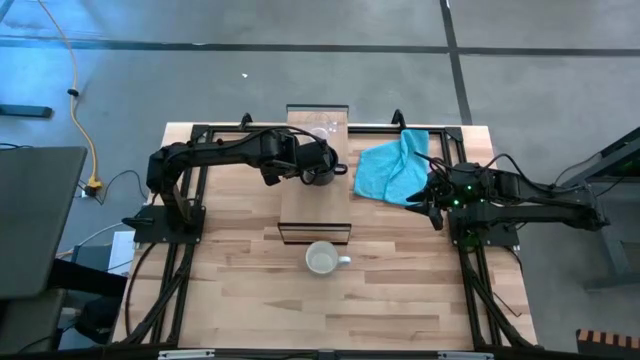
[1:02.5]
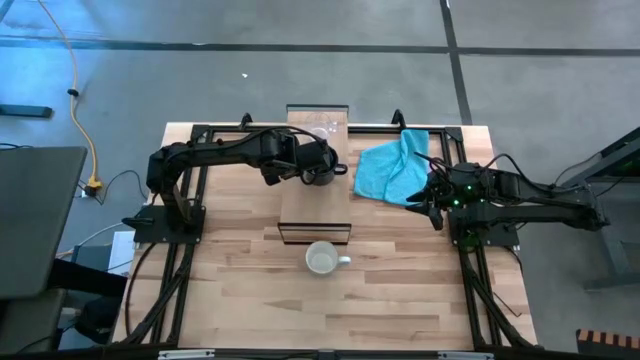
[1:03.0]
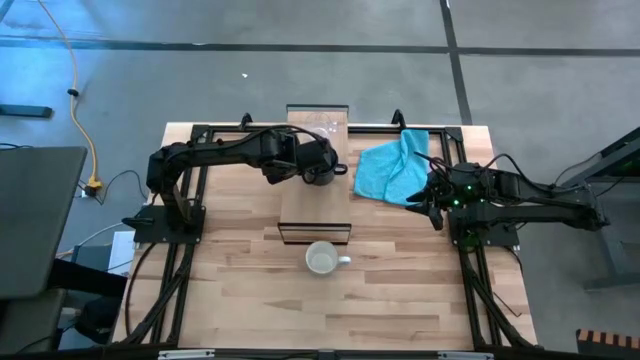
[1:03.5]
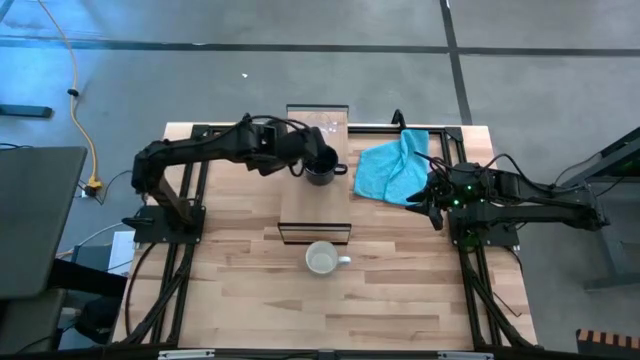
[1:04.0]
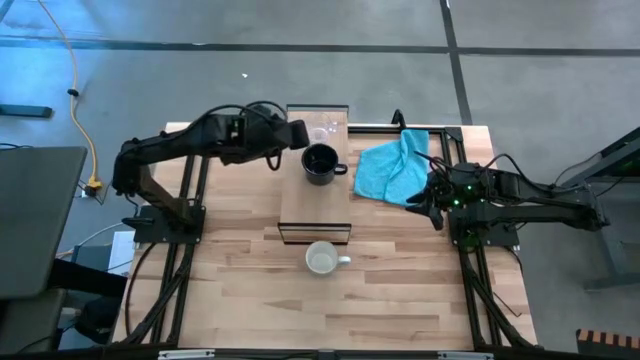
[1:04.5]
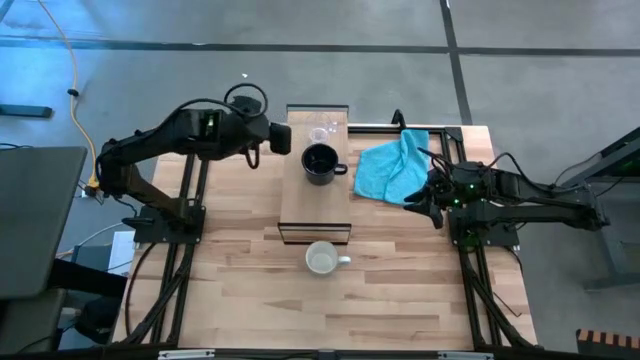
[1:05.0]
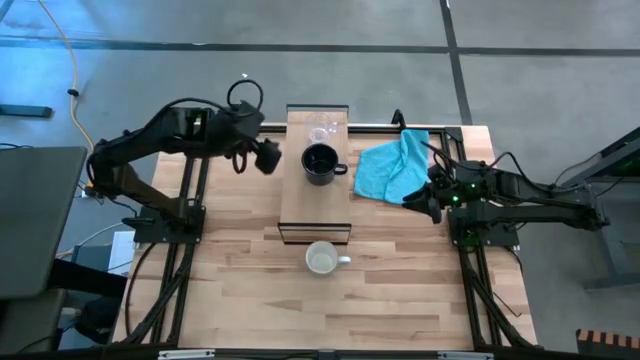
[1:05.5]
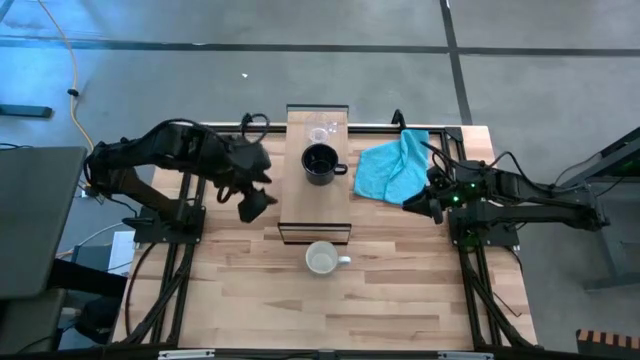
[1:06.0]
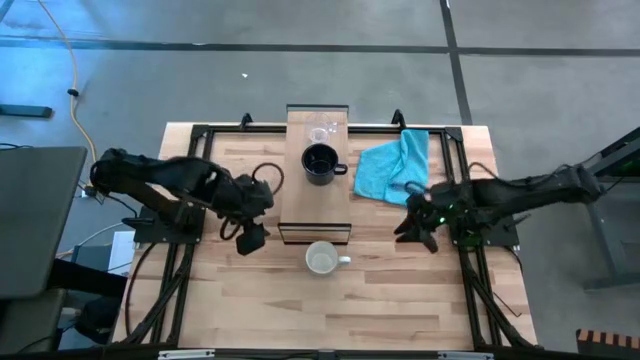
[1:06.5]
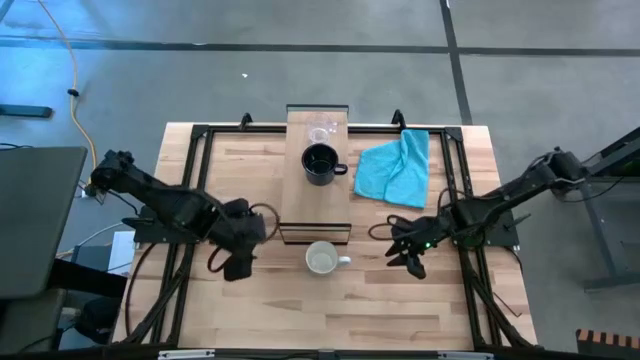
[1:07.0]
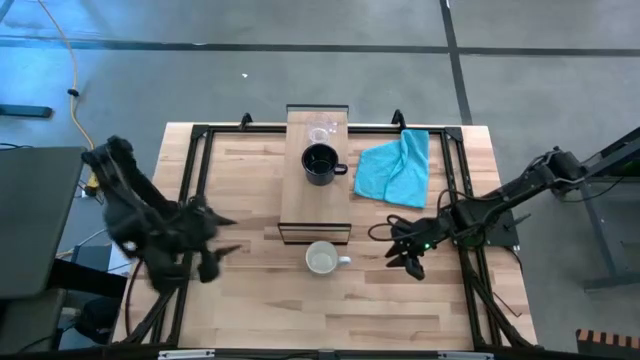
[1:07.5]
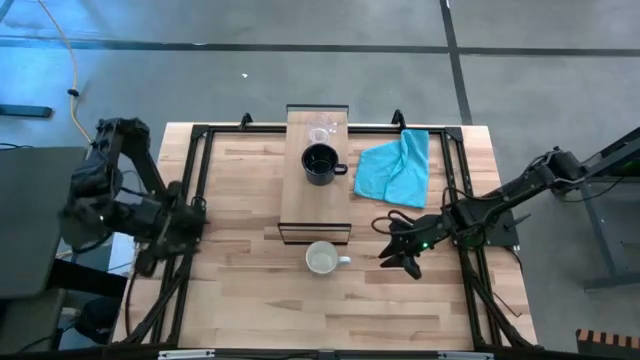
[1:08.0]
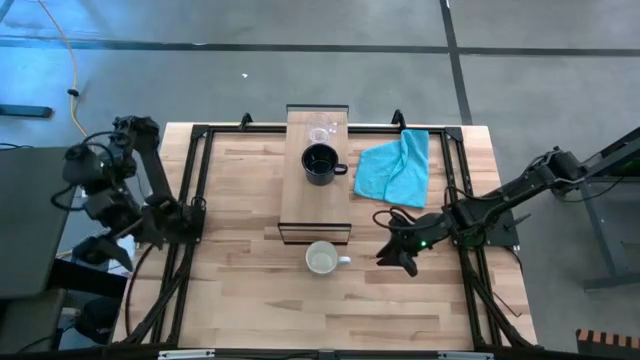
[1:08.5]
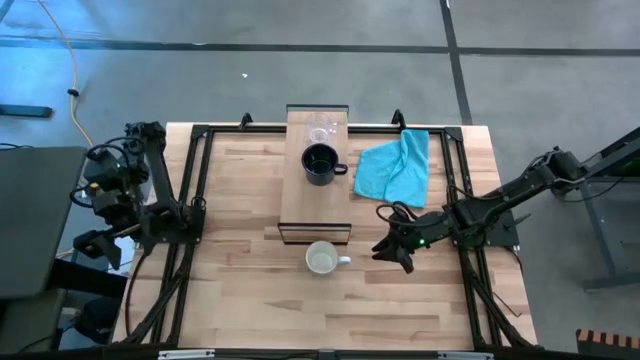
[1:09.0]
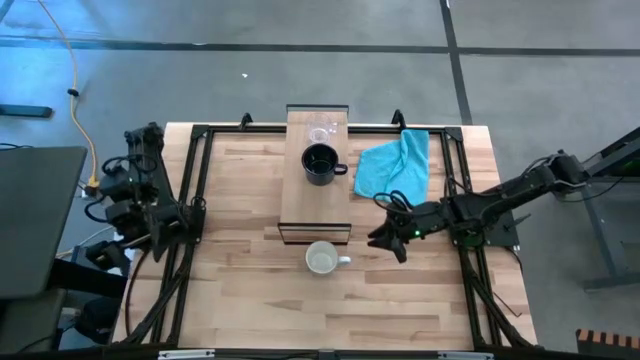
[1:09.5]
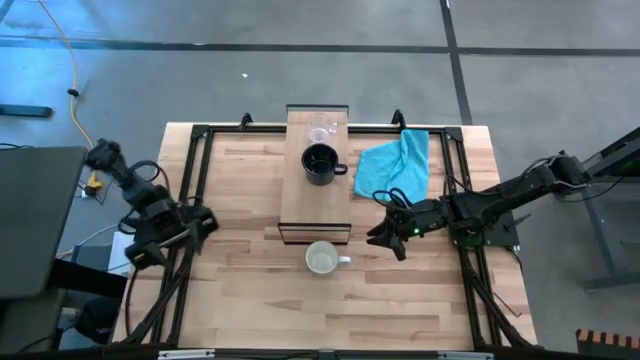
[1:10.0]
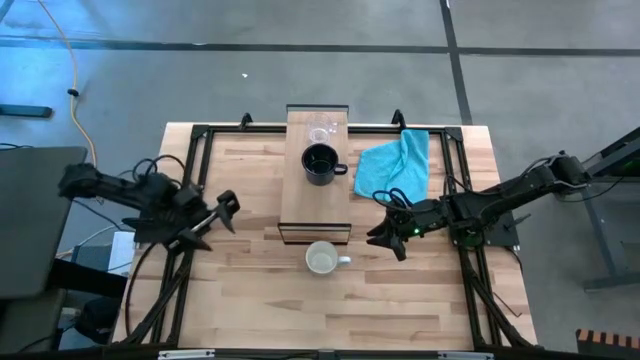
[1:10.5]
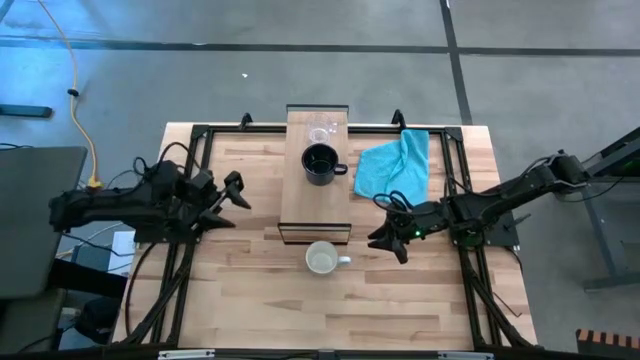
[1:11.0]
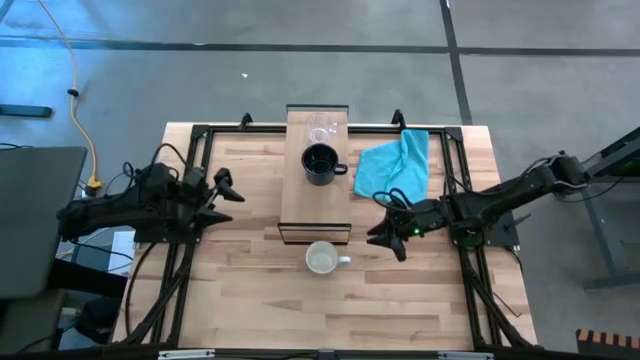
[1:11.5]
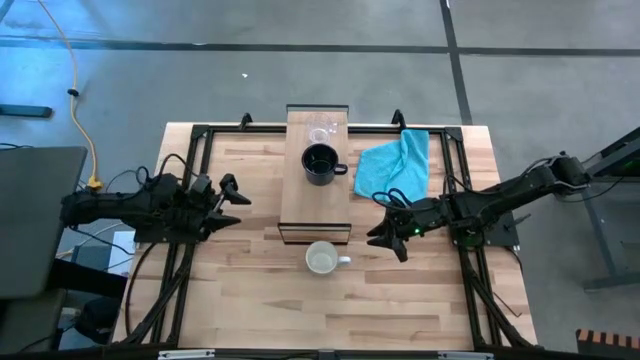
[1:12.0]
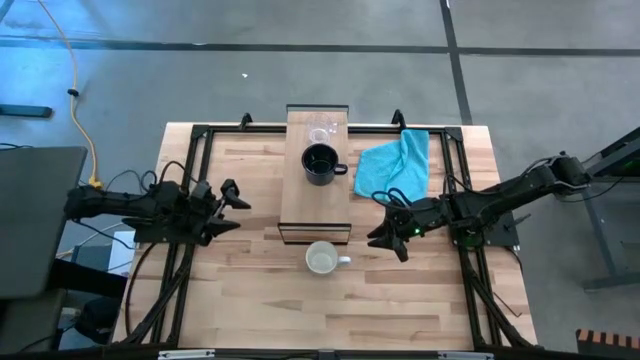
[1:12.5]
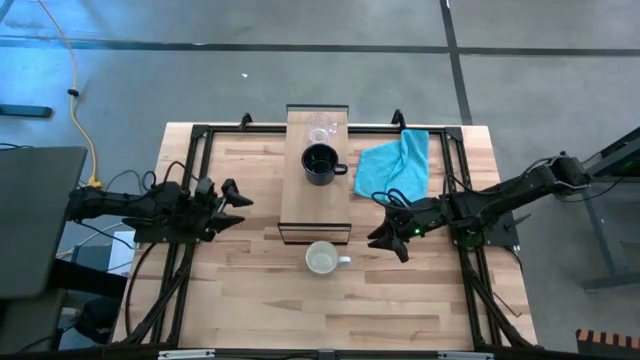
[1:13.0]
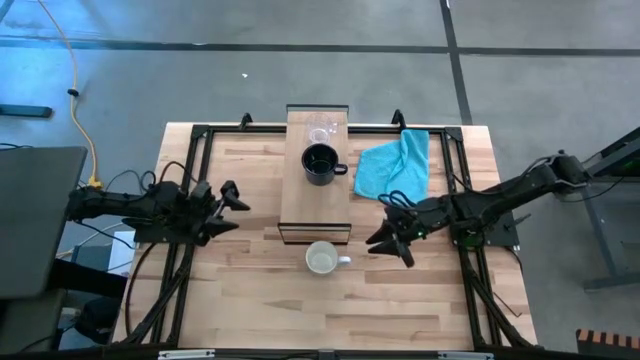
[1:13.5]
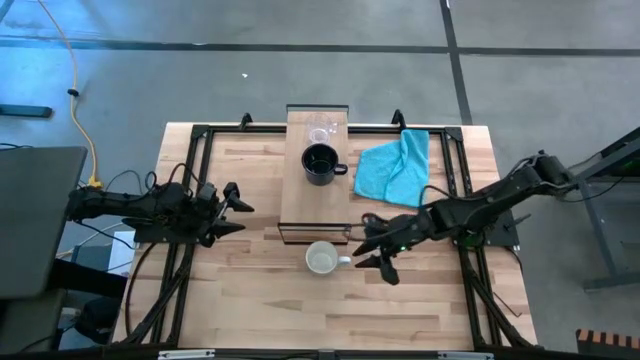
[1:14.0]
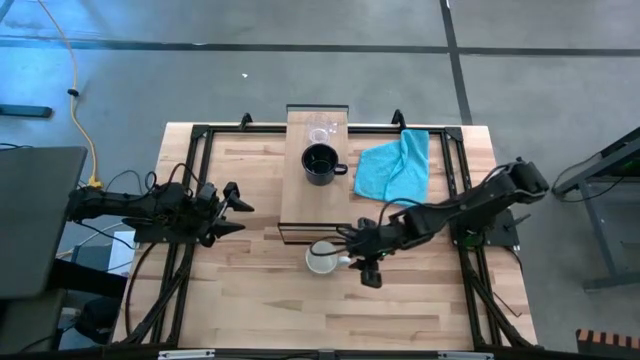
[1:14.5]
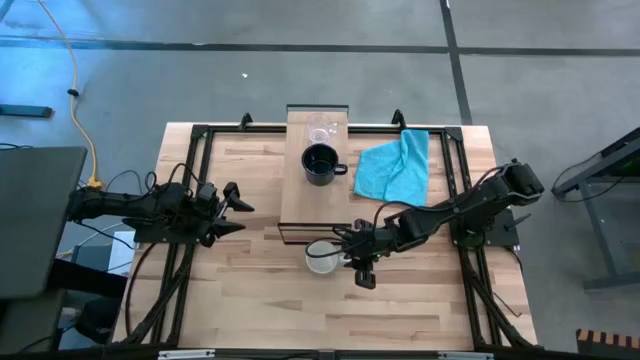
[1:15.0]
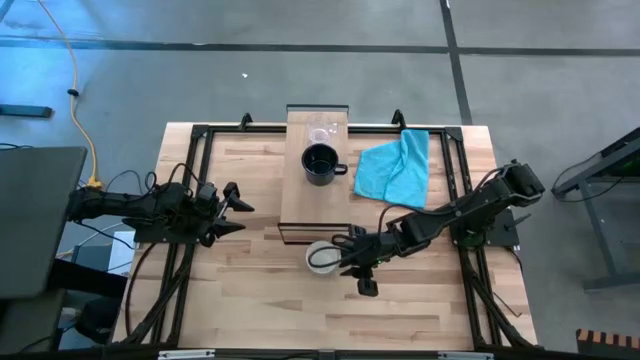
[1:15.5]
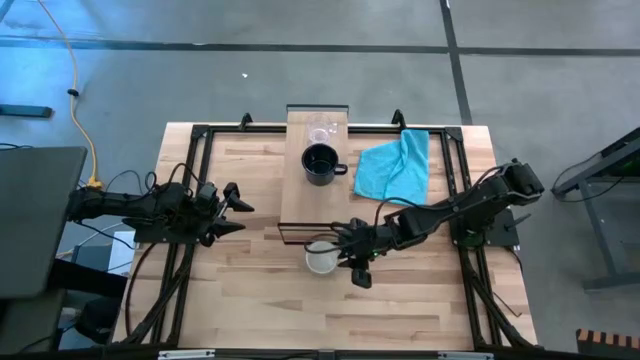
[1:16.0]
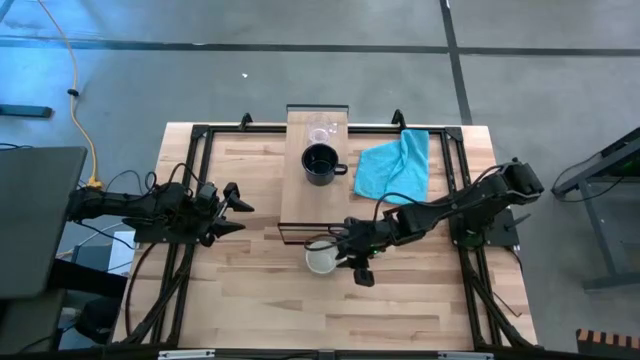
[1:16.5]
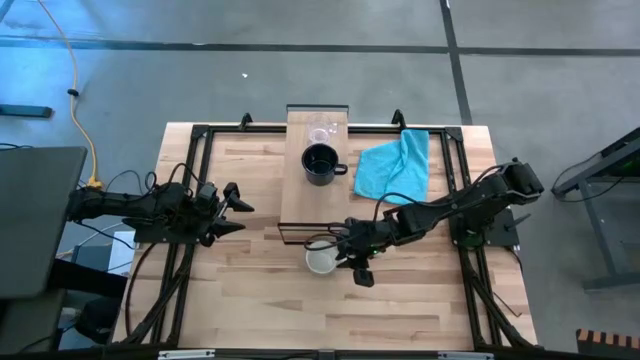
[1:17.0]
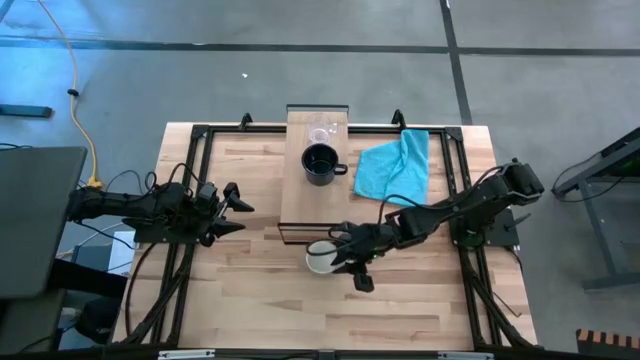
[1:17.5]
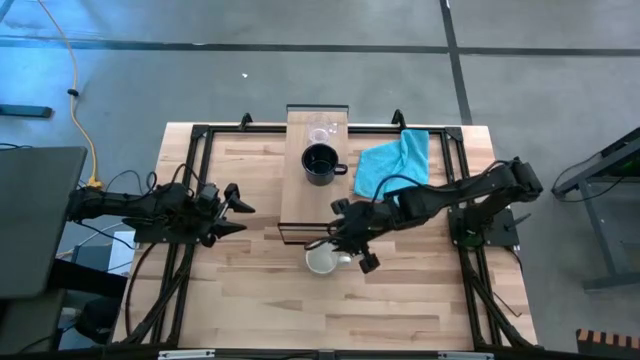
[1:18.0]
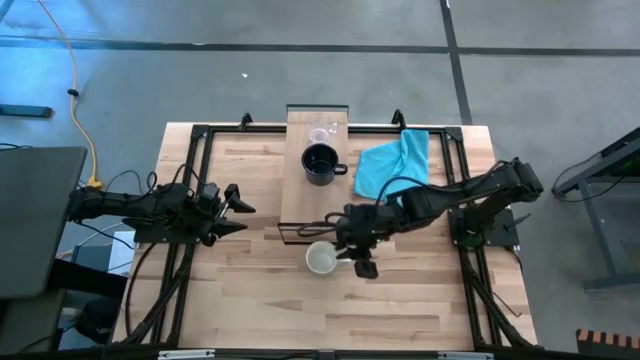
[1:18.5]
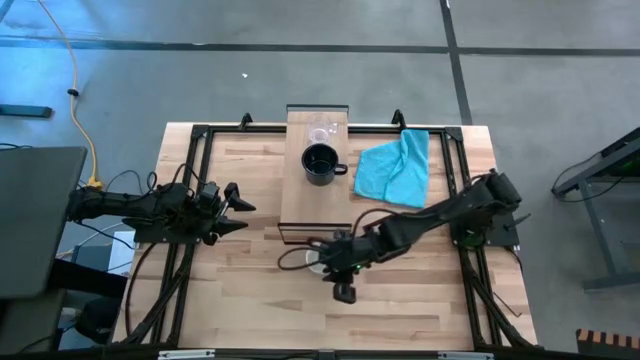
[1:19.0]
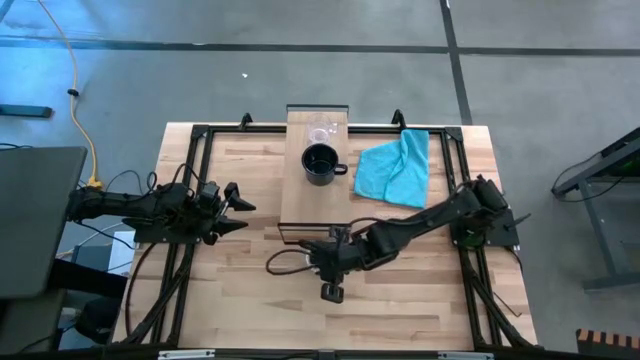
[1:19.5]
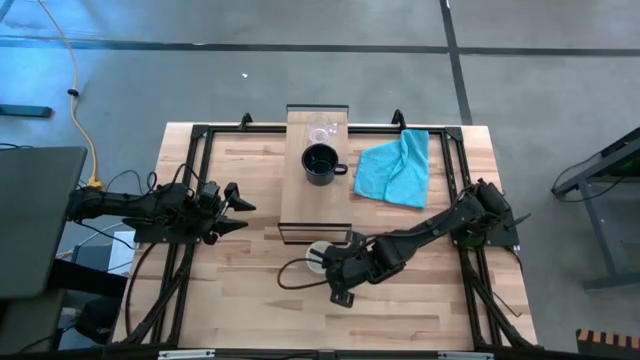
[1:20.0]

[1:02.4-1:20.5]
Task: Stack small to large cups/mugs on shelf
Put the blue mug on the shelf

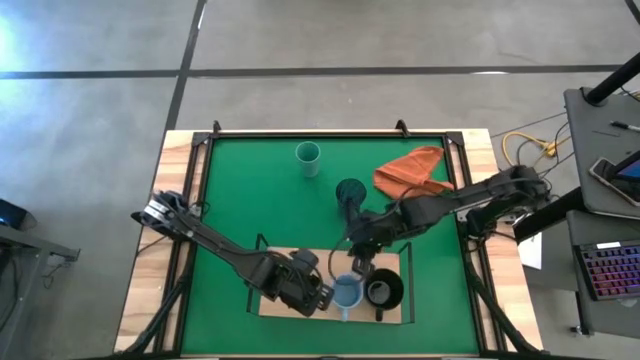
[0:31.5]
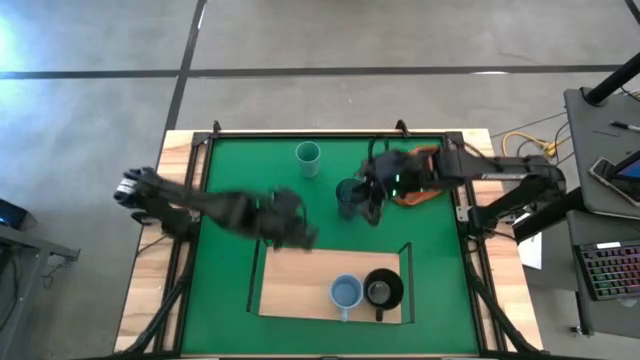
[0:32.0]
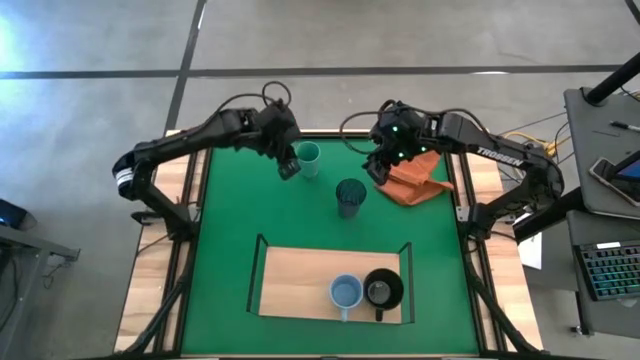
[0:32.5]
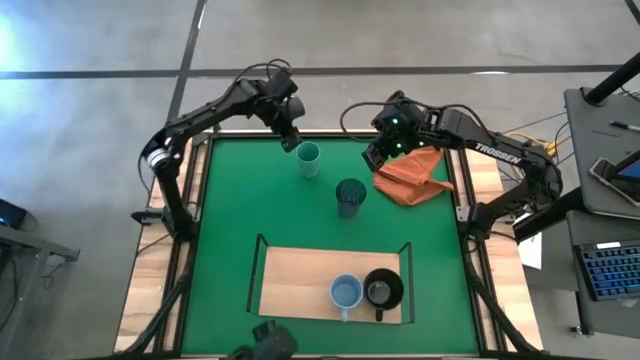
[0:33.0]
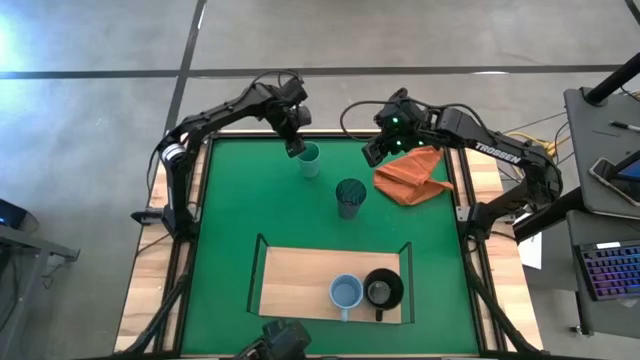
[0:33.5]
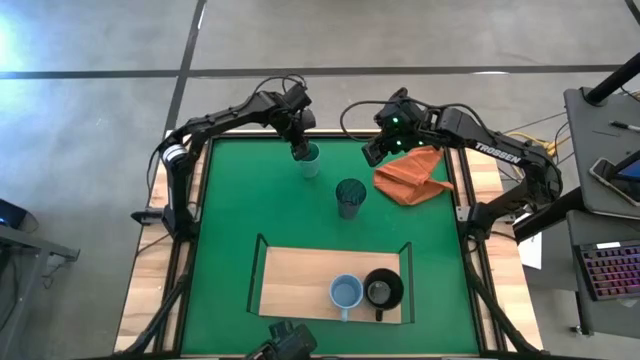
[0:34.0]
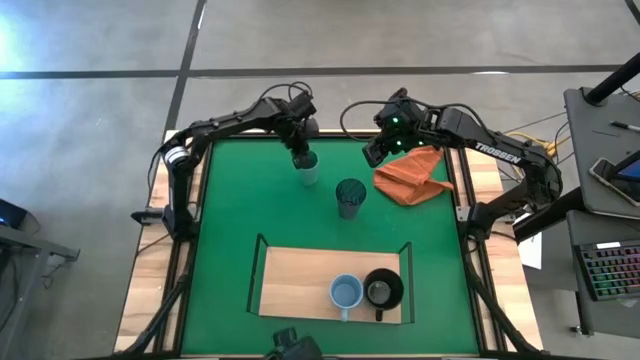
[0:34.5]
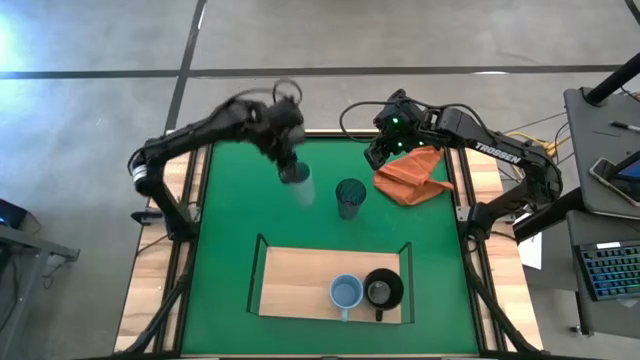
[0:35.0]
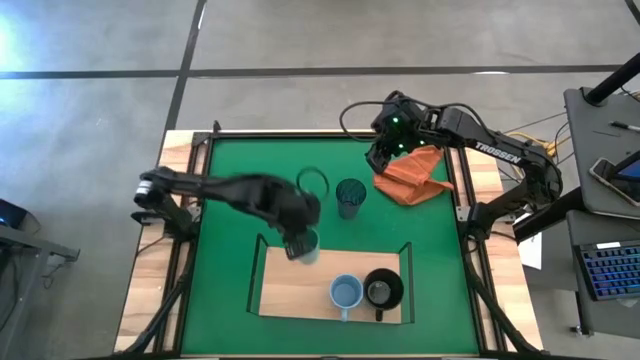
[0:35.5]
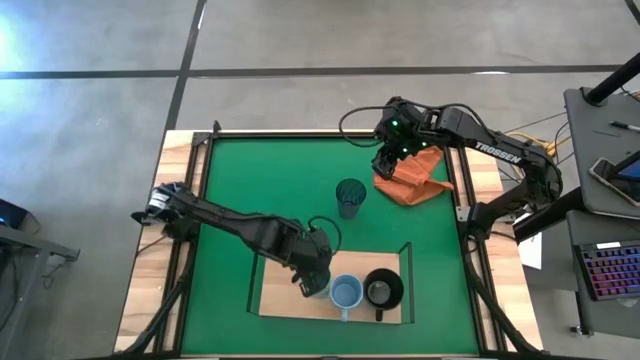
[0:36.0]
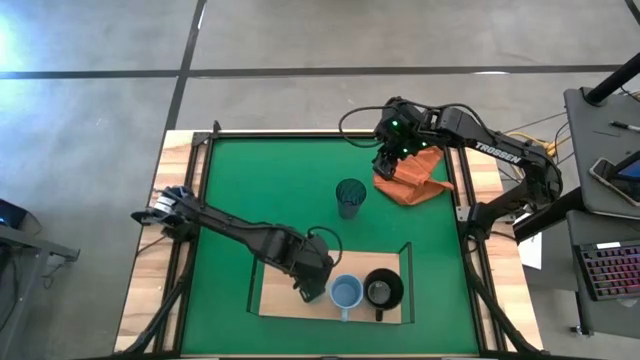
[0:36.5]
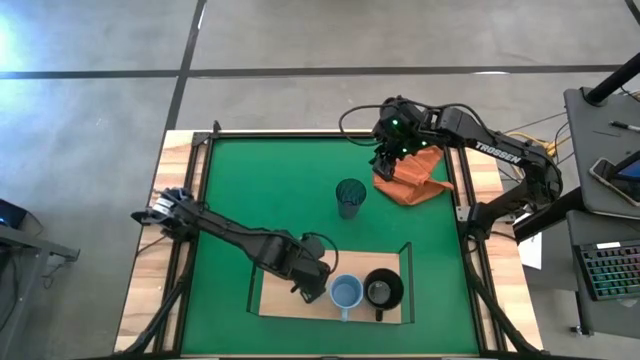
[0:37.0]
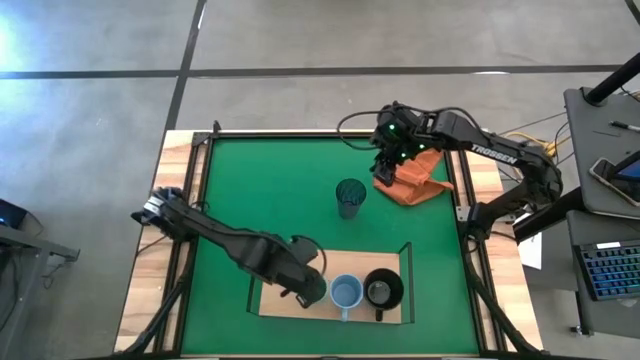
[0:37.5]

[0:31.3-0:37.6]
Task: Stack small to large cups/mugs on shelf
Put the green cup on the shelf
